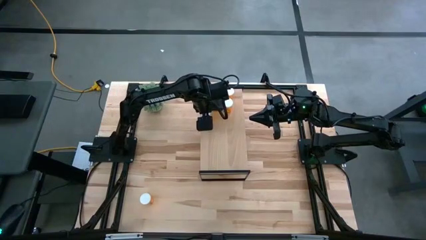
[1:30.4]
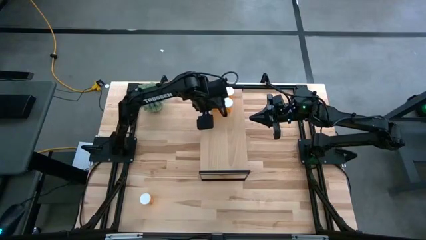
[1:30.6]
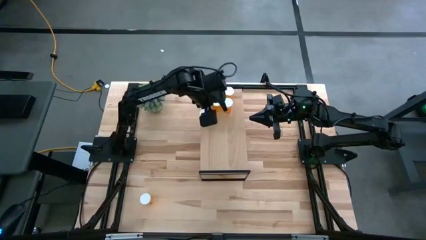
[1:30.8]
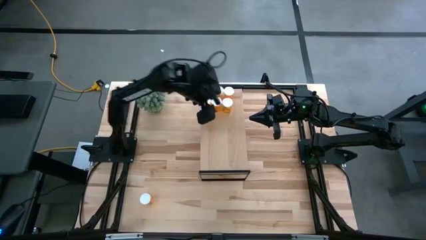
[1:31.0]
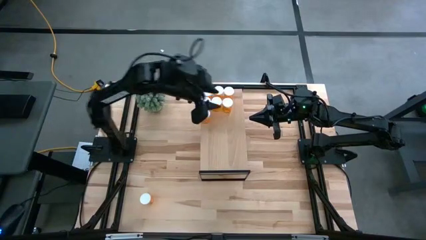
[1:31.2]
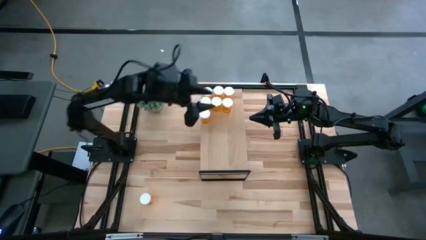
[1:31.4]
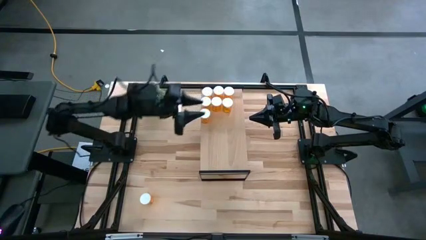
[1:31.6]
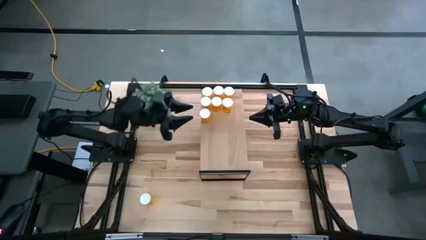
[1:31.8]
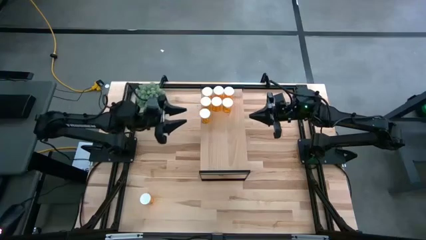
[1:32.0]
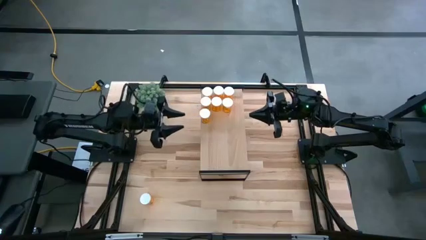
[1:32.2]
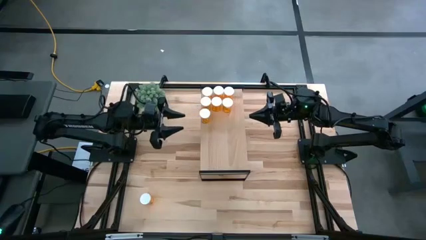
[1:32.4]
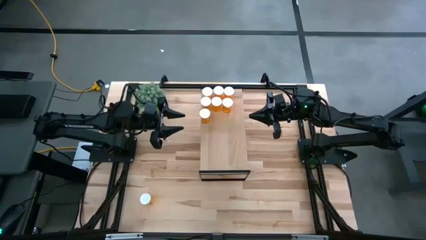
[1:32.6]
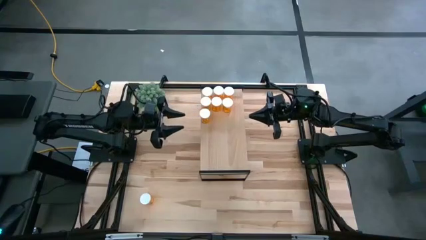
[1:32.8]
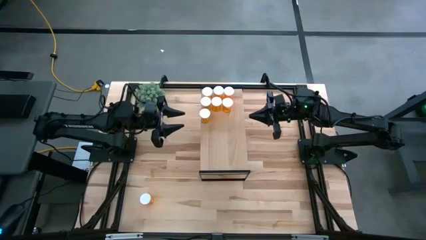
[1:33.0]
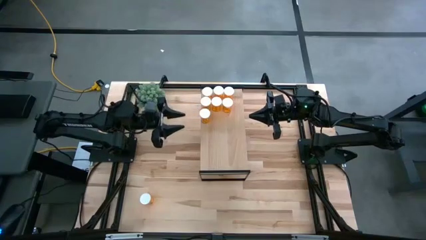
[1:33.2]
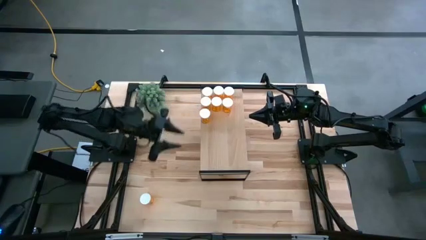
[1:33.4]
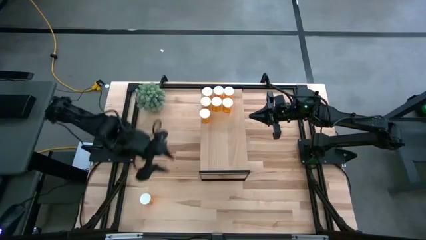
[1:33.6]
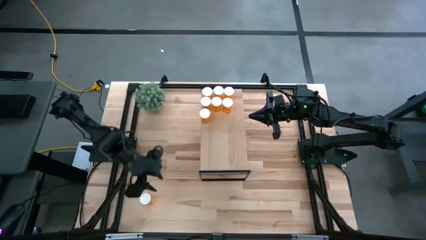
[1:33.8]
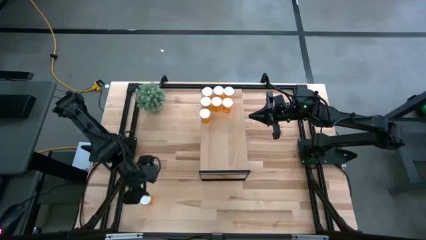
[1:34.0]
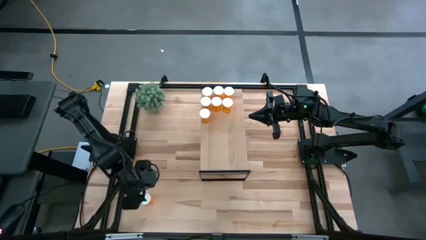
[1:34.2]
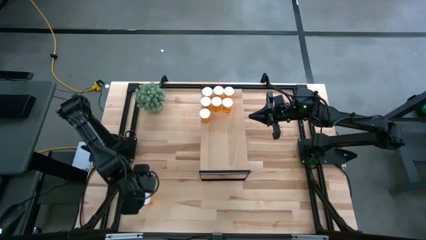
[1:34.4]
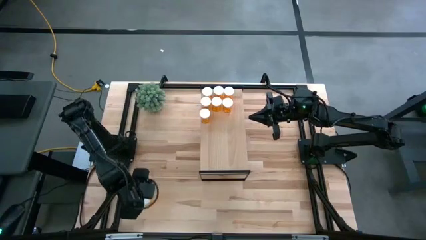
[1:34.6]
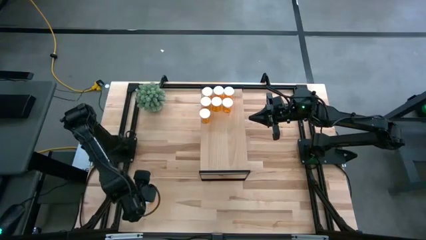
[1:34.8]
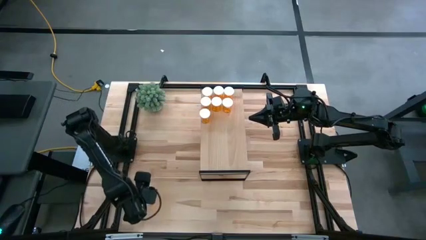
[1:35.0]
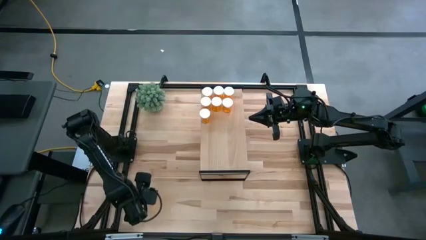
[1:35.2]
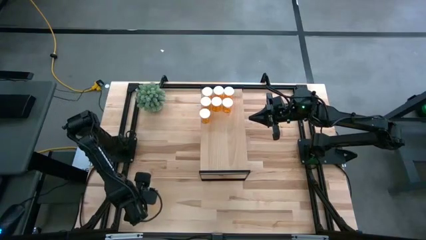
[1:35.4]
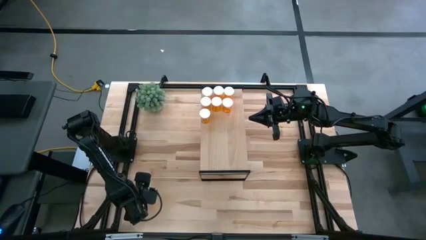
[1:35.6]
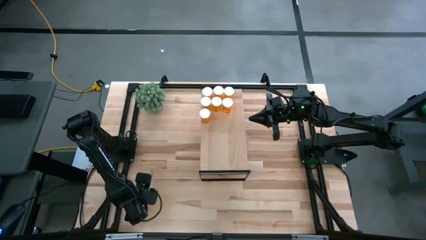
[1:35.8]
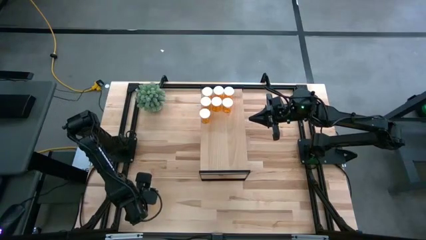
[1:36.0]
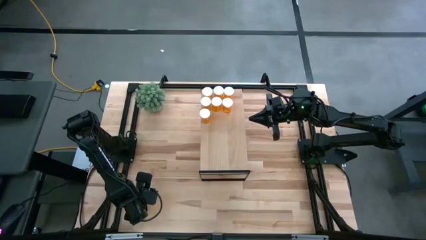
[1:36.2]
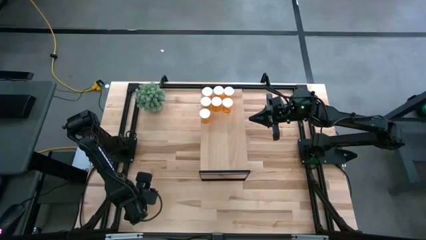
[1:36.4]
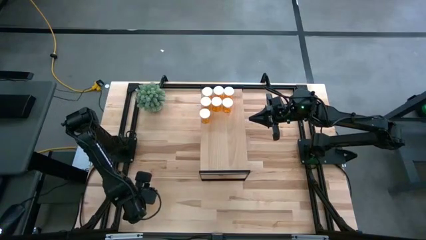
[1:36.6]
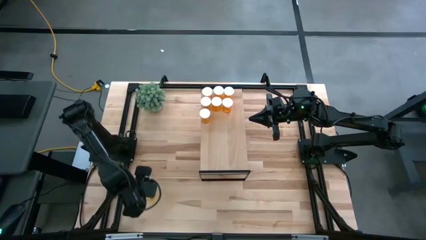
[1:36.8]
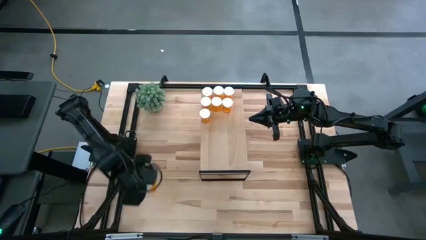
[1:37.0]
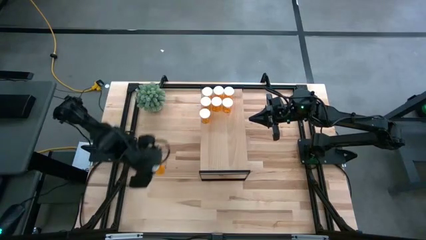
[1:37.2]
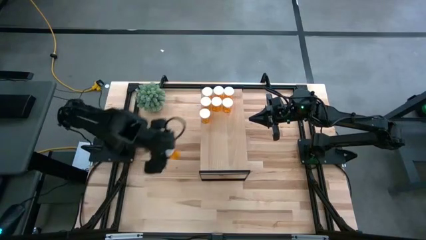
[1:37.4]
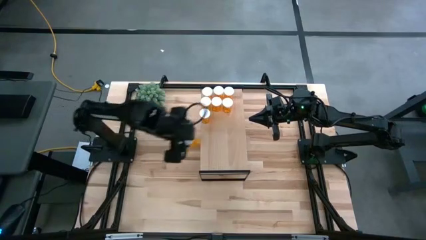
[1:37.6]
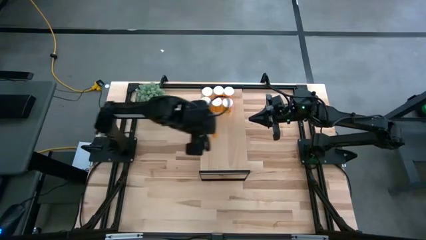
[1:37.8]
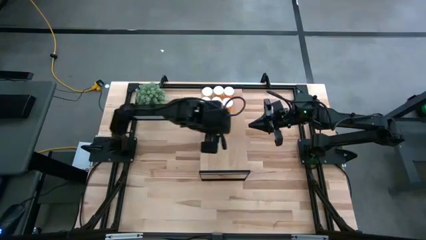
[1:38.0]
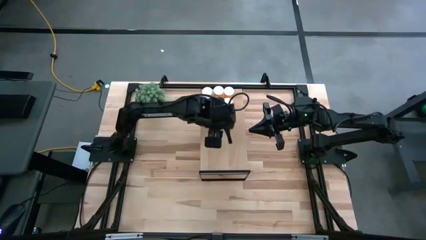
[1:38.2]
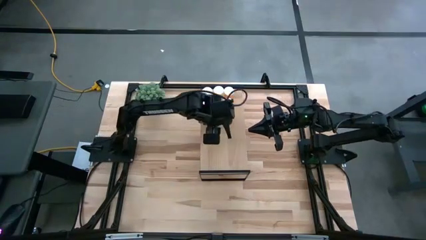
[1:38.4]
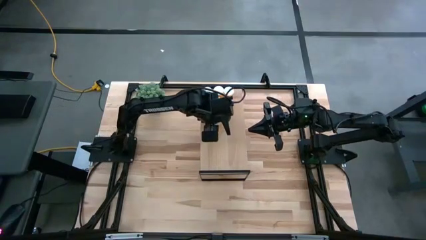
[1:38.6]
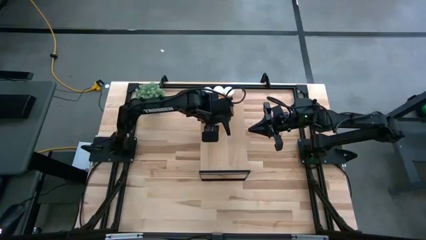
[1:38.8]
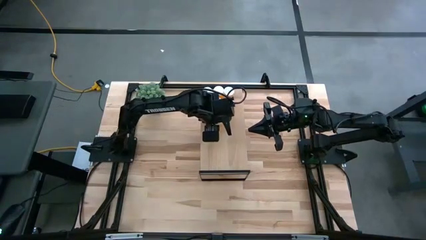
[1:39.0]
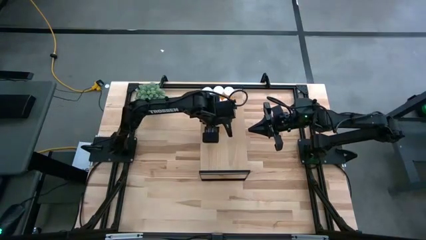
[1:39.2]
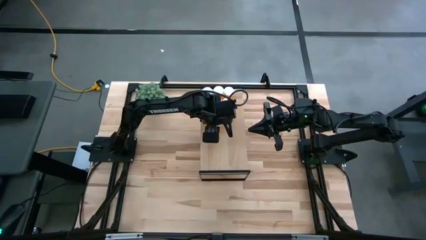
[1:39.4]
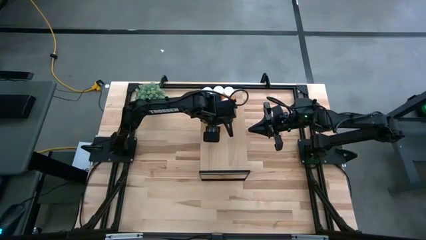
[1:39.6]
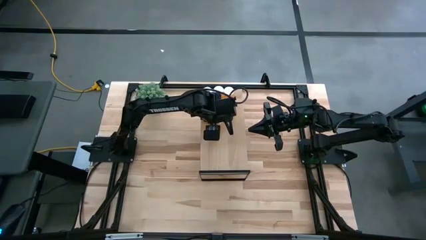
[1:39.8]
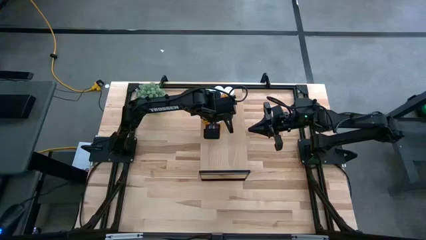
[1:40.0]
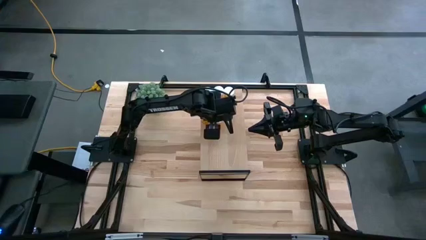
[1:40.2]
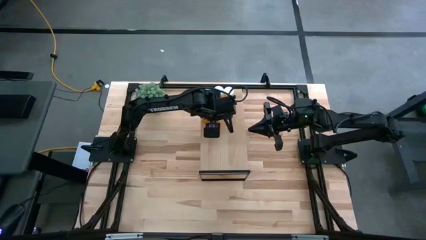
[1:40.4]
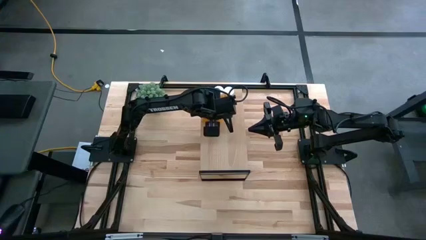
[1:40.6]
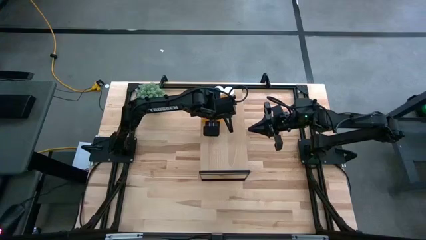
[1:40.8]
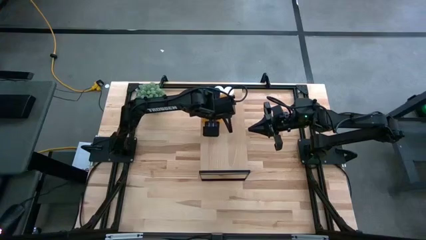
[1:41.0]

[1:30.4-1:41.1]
Task: Pick and place medicine bottles onto shelf by color
Put the orange pill bottle on the shelf

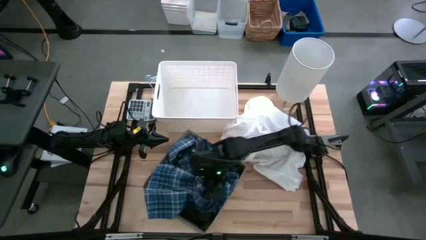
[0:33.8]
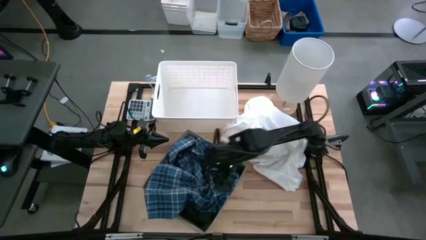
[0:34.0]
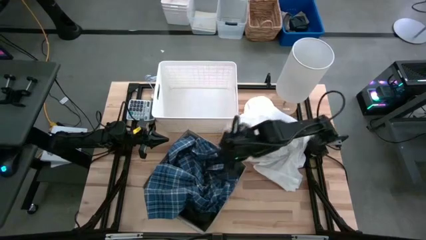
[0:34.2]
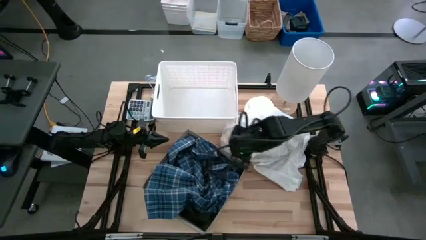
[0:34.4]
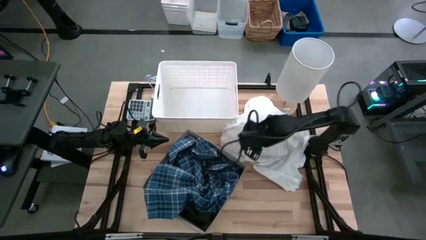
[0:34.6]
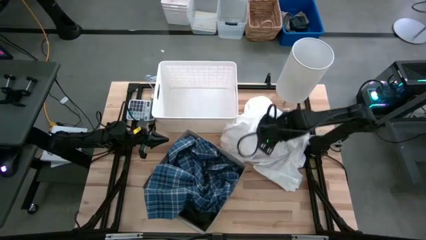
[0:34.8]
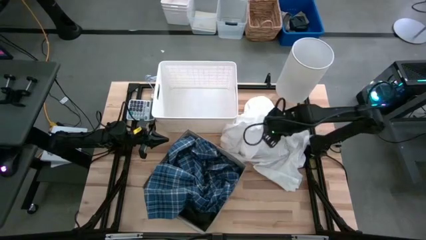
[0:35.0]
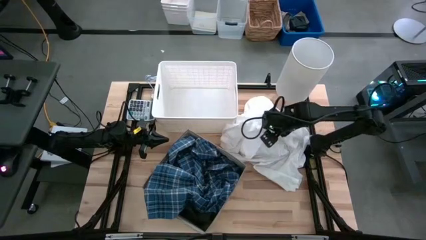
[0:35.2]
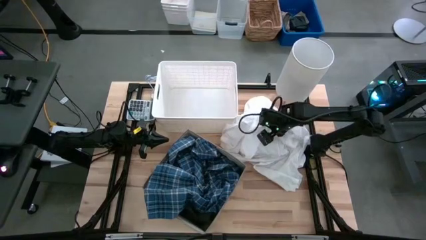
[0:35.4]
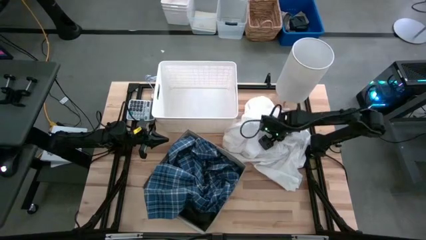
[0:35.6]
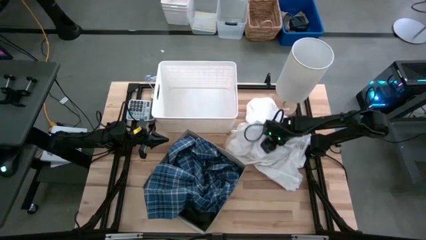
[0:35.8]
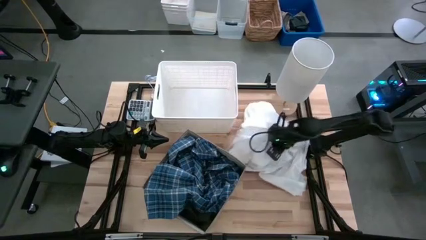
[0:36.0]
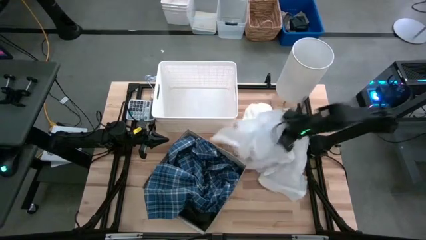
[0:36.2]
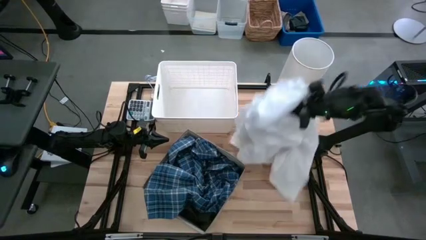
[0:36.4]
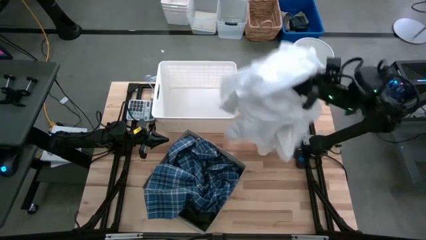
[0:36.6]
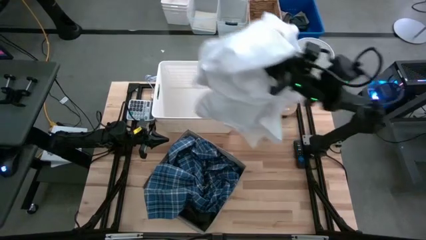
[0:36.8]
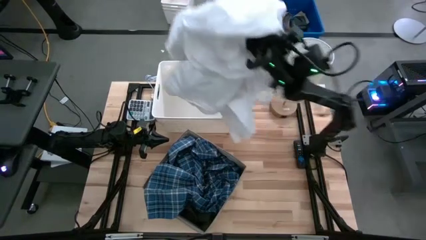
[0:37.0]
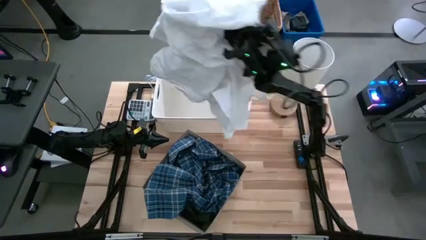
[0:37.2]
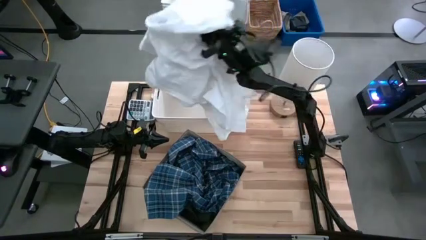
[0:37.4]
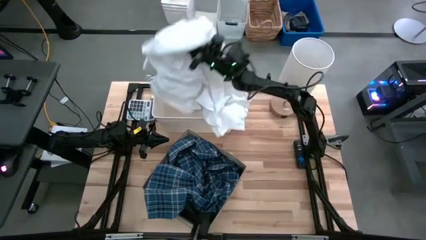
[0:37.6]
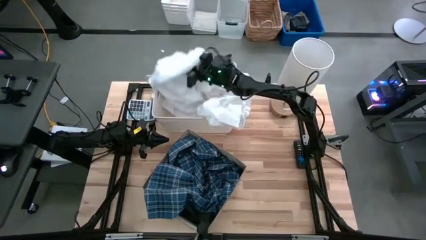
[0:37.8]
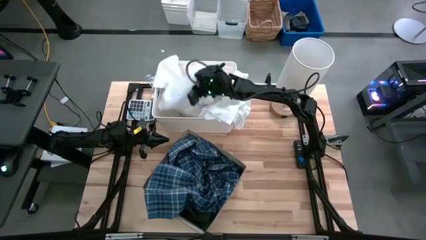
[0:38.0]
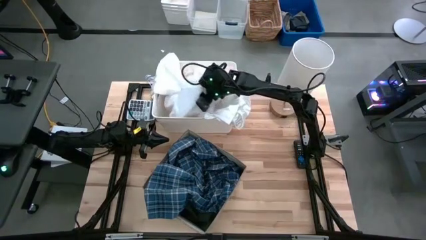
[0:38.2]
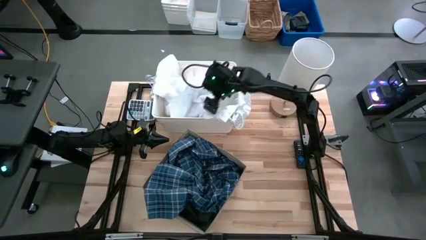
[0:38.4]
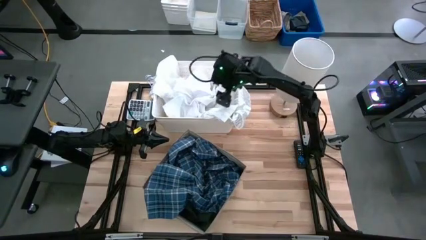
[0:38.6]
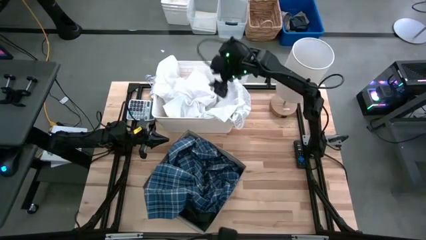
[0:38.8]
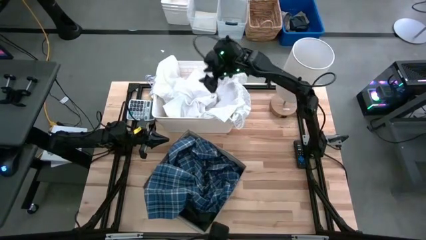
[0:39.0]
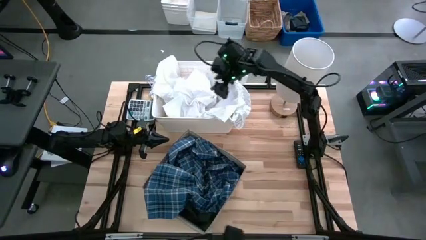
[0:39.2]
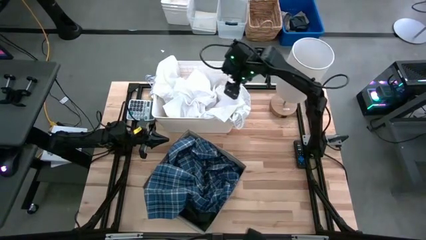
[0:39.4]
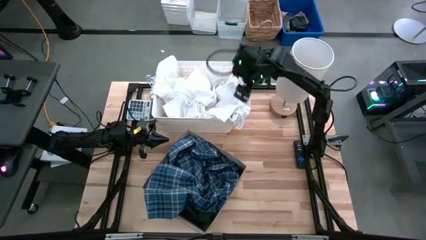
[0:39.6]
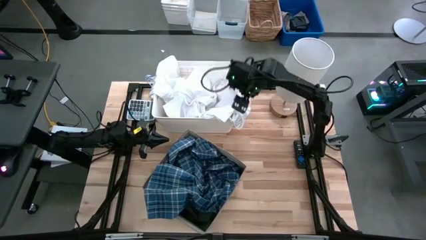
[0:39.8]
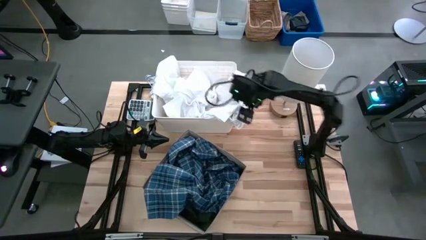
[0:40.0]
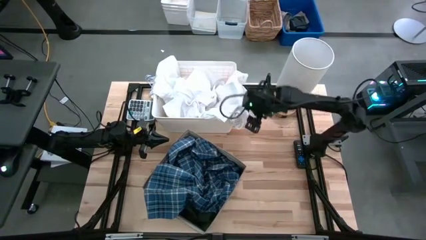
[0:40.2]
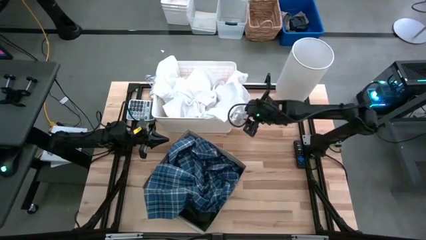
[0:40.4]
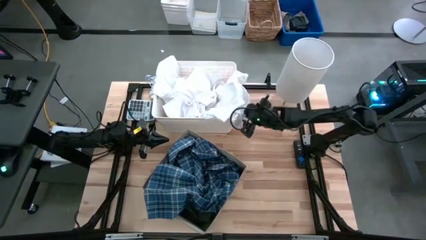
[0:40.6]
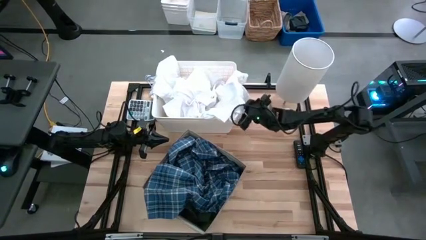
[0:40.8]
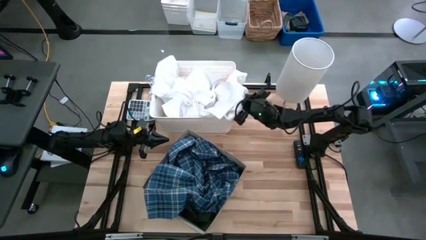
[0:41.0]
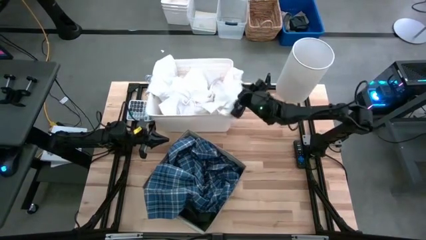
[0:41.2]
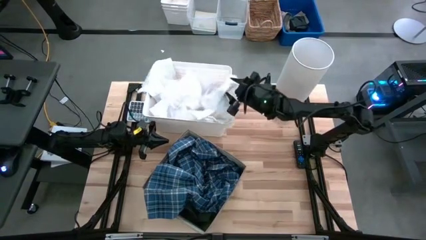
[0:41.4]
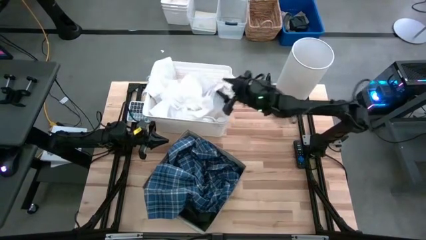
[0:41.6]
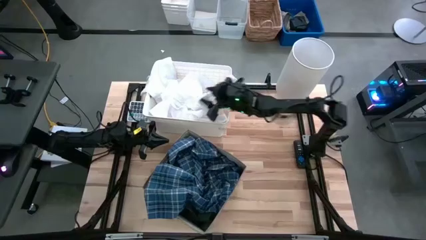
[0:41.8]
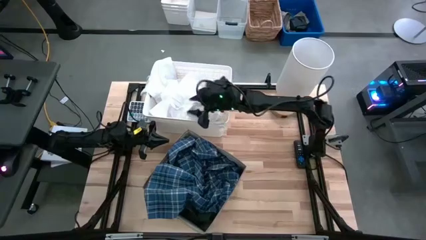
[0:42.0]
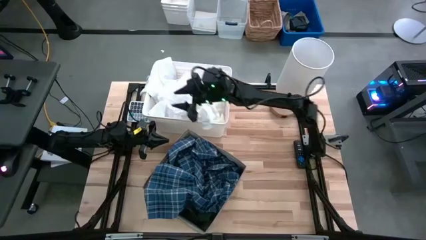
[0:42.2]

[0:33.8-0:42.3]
Task: Sort clothes
Put the white shirt into the white bin
